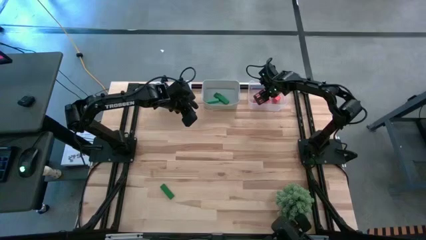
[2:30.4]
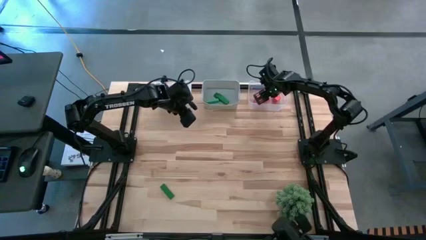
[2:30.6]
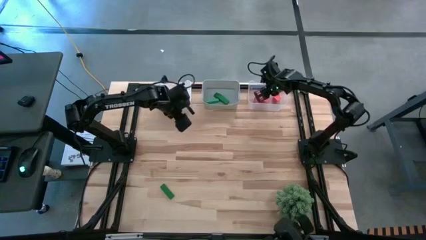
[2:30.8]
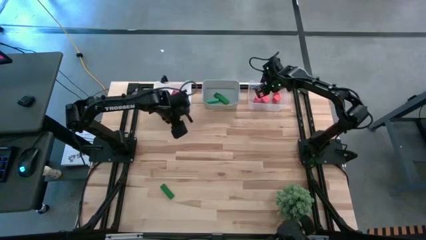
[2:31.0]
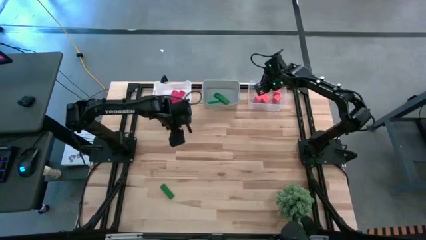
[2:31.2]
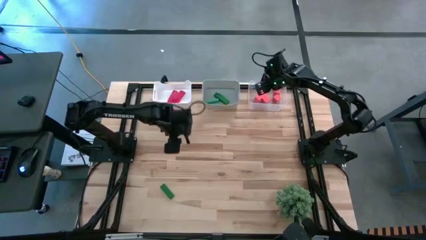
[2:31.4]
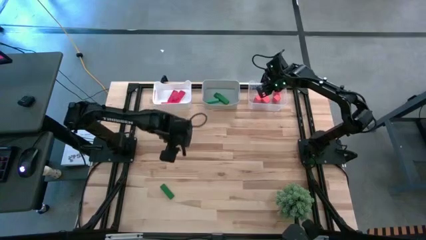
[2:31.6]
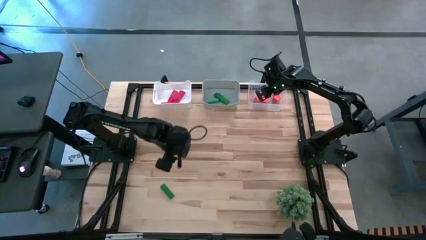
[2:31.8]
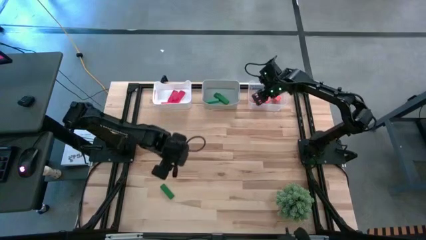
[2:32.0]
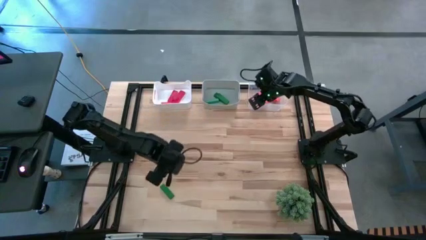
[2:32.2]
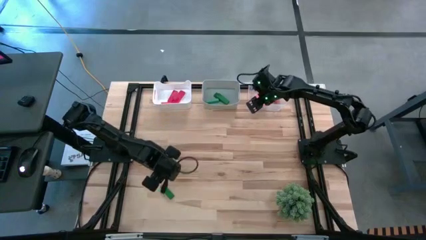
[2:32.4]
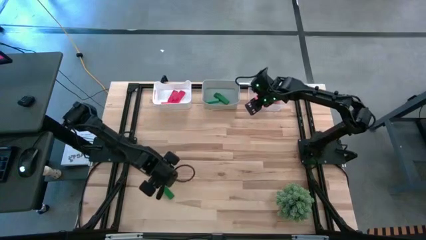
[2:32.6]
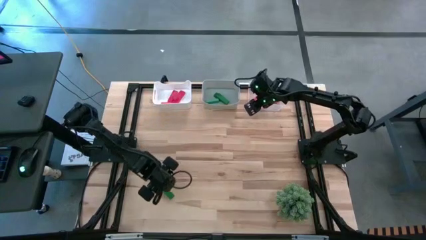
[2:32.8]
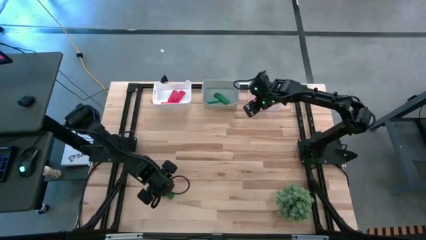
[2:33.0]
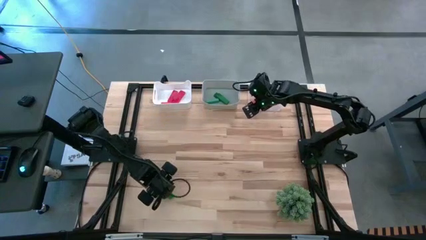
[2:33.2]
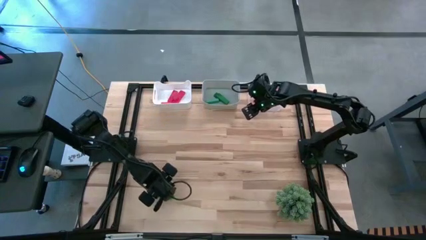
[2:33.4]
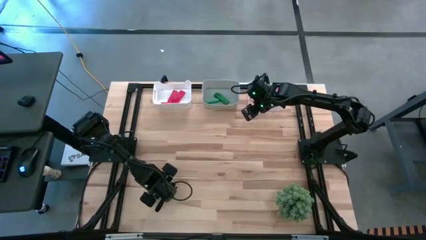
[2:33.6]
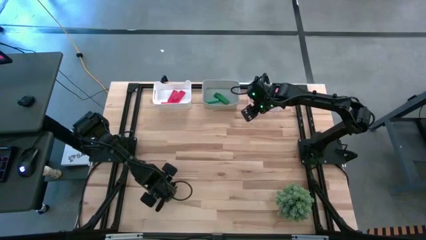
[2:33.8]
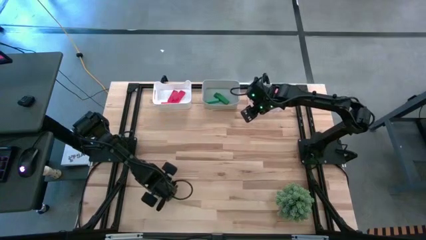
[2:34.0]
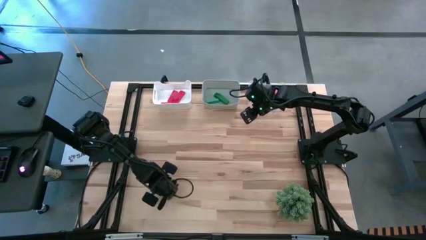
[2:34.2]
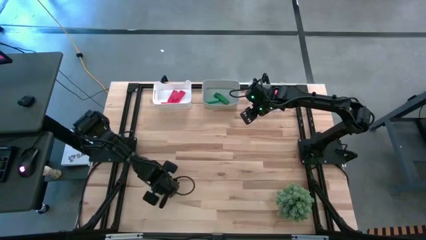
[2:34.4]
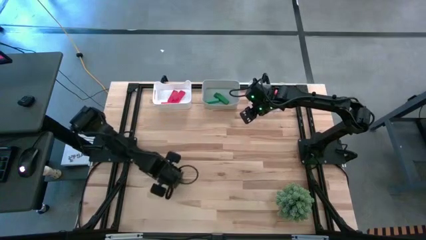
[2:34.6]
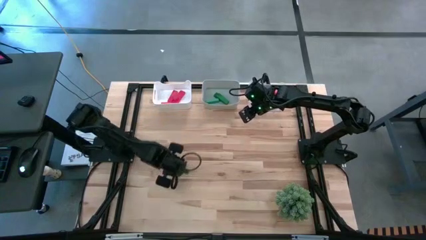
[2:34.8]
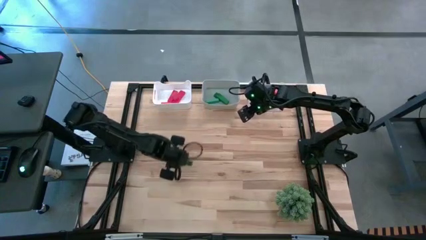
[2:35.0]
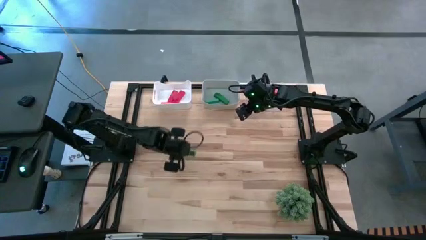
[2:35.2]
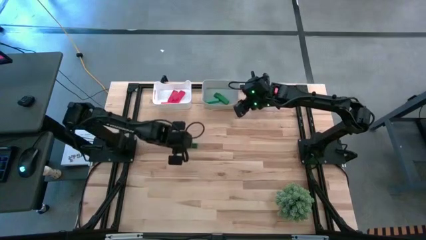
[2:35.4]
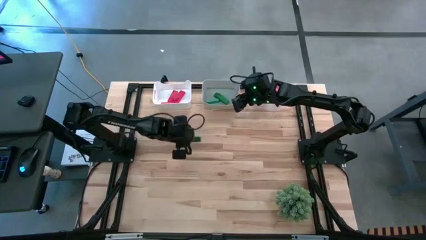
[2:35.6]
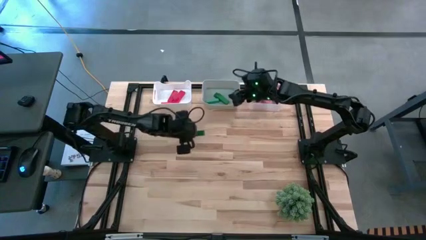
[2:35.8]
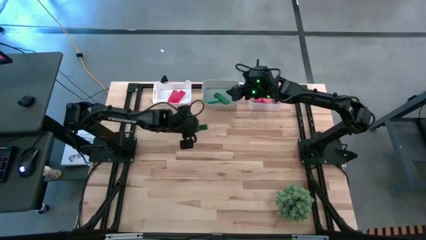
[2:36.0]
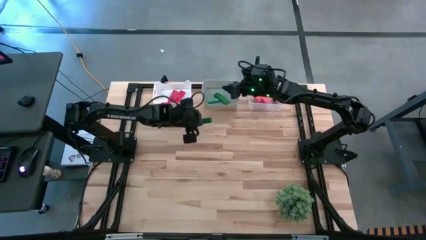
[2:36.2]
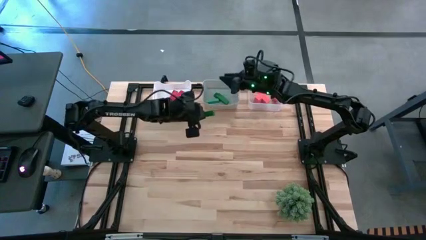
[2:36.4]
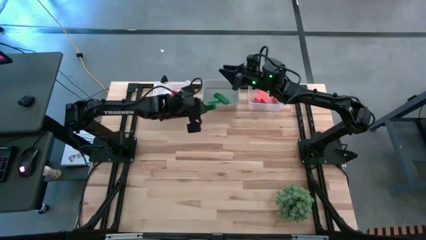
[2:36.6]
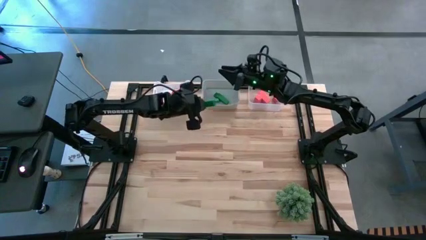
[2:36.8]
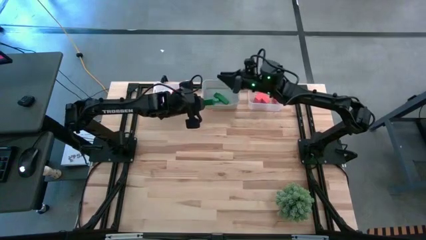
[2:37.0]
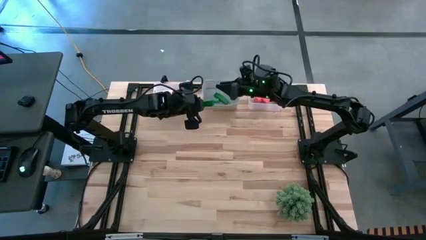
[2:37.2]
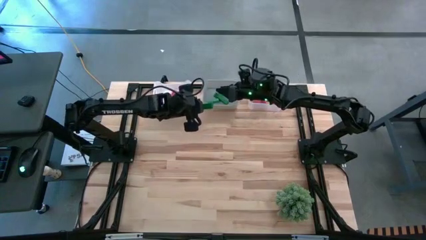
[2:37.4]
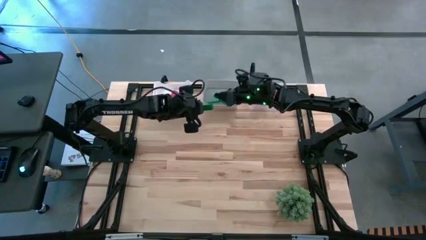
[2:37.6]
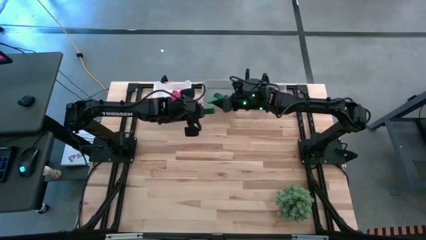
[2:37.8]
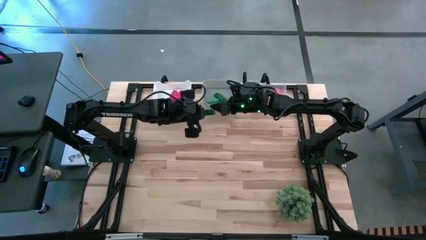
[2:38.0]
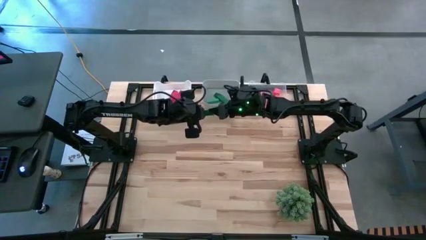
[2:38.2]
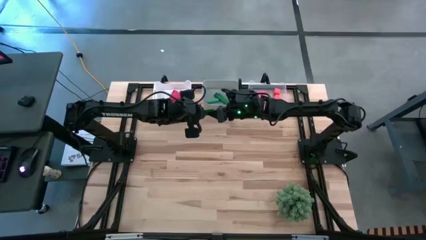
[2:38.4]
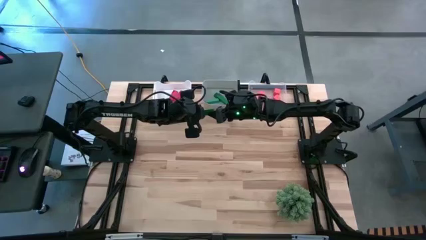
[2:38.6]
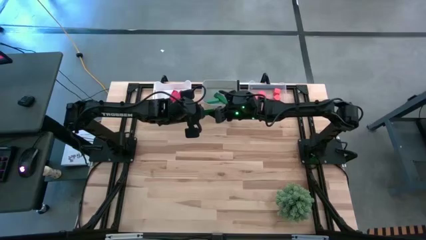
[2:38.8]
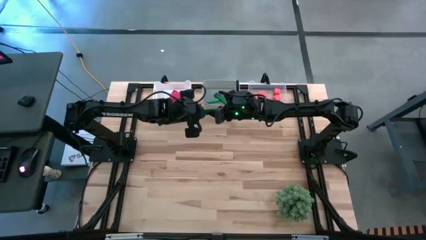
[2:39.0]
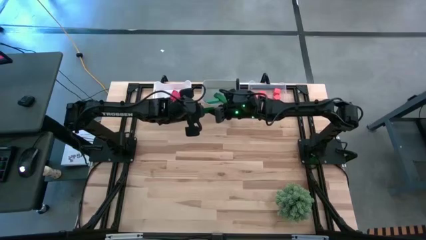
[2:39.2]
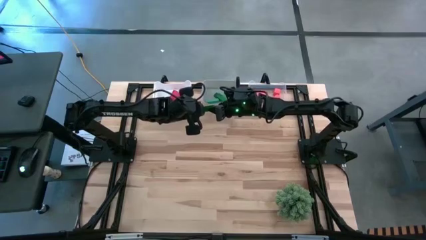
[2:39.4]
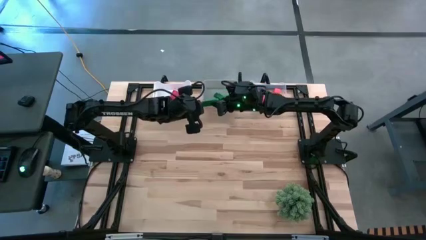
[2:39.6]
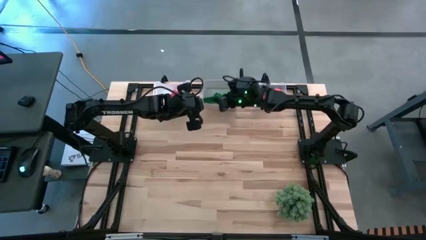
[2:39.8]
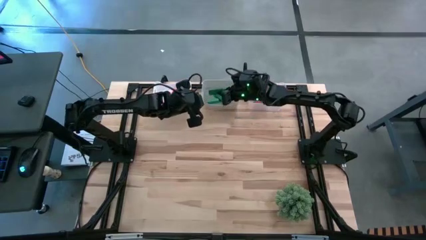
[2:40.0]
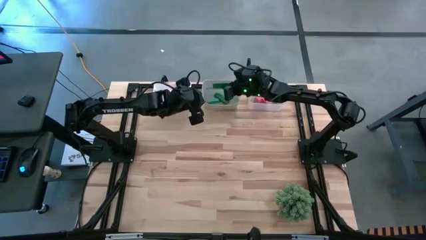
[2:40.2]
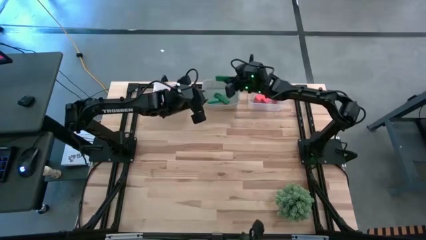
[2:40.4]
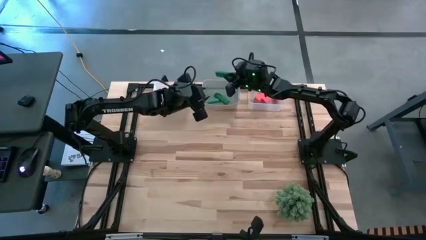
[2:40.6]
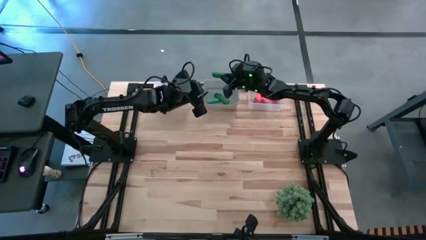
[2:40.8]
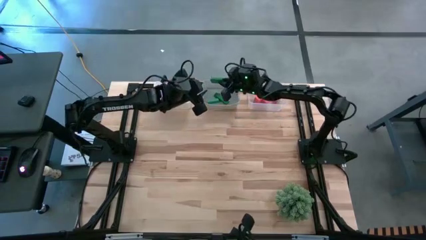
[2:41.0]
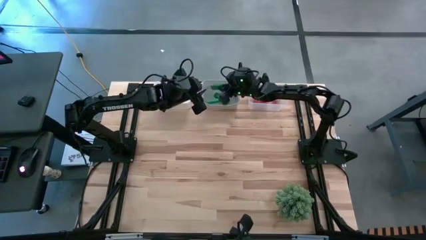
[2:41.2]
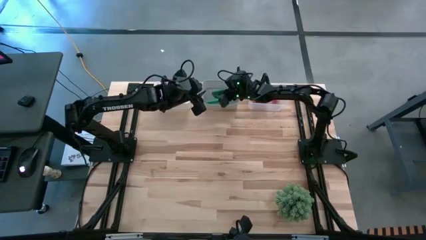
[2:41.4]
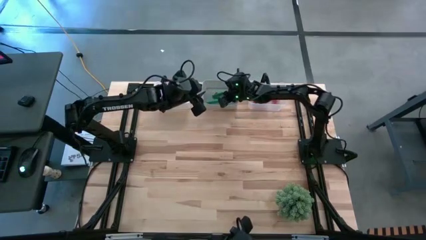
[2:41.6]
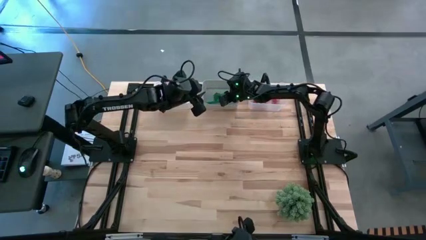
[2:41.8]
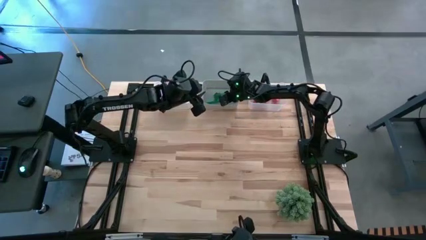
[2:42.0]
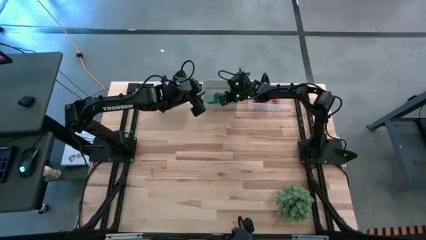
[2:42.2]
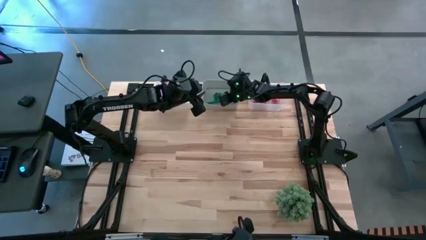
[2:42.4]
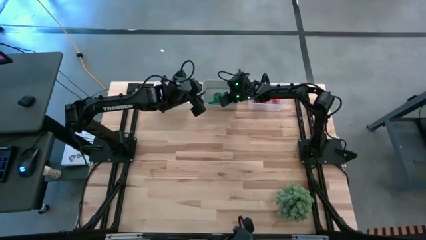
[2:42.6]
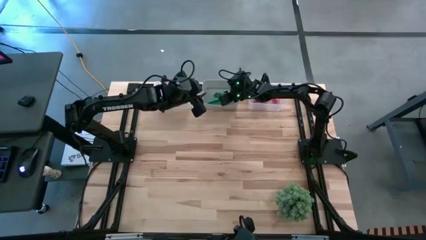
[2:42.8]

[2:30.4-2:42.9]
Task: Sort & place blocks by color
Put the green block into the grey bin
